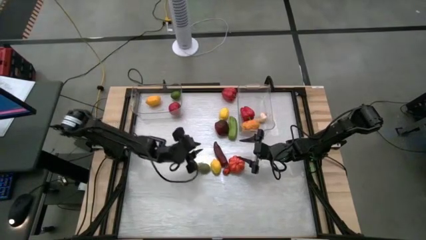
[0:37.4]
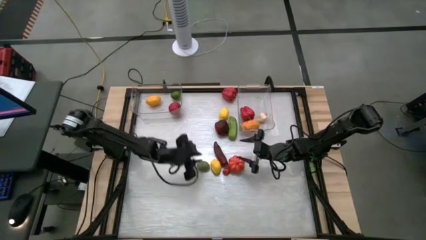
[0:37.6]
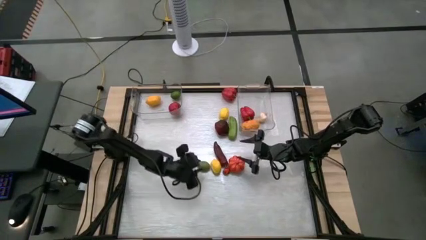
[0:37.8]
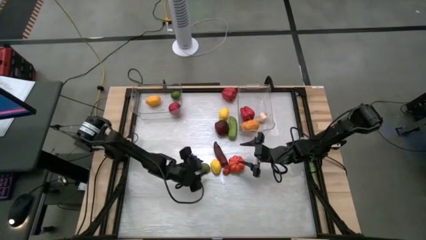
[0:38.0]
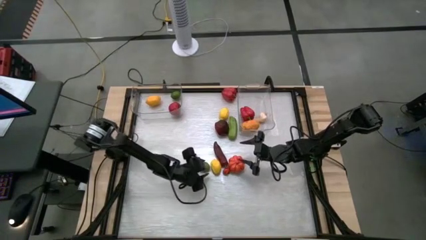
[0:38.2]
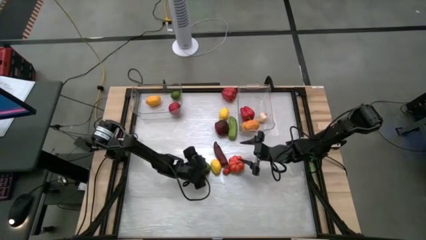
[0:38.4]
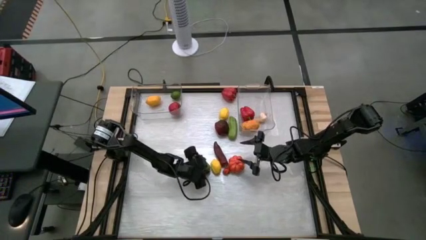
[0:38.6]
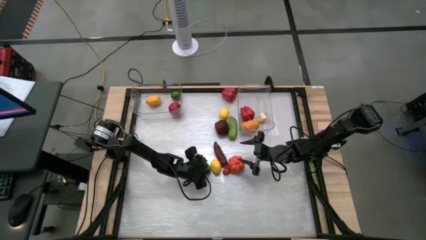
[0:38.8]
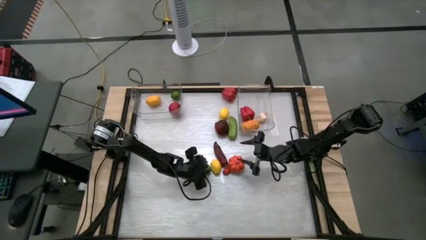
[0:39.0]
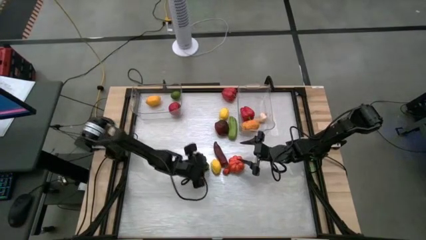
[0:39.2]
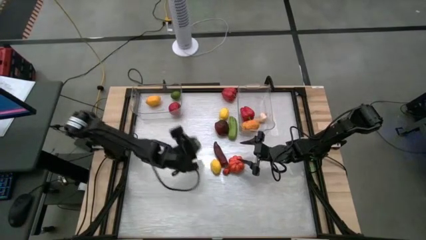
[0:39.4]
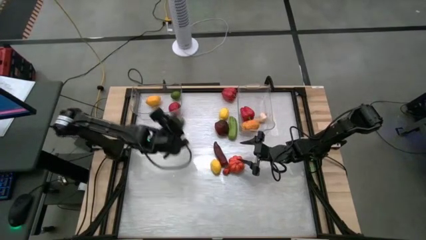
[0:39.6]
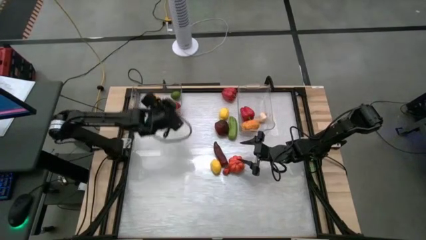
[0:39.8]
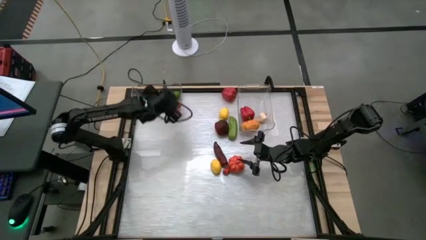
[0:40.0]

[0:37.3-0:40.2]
Task: Sort produce into baskets
Put the green lime into the left transparent bin

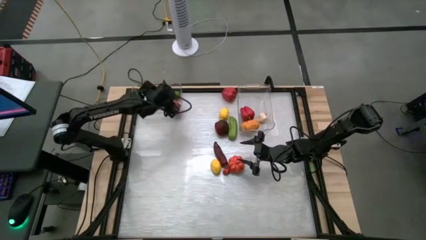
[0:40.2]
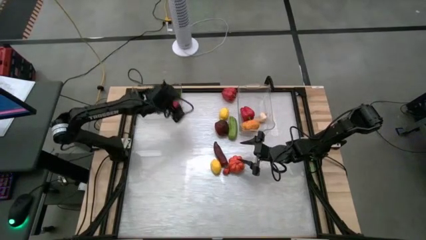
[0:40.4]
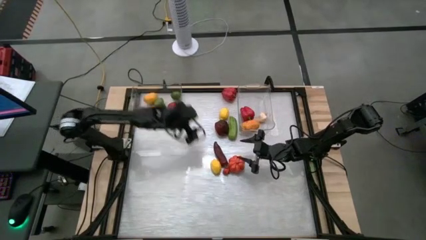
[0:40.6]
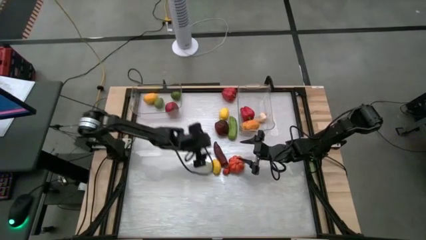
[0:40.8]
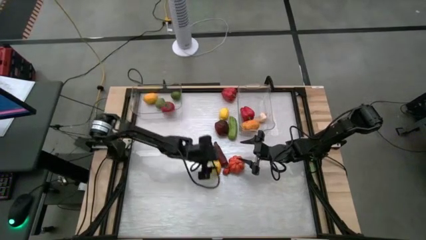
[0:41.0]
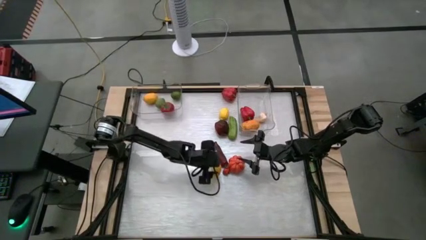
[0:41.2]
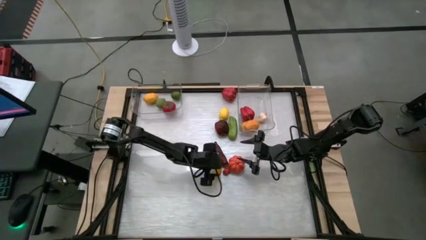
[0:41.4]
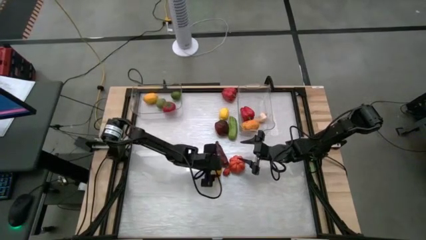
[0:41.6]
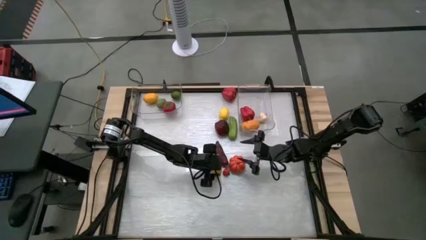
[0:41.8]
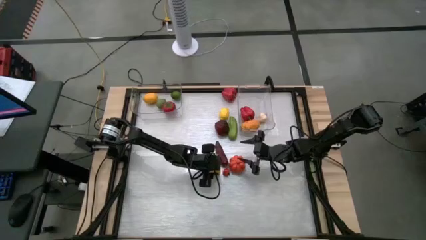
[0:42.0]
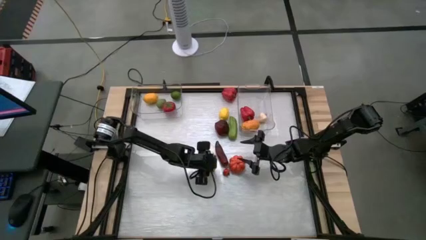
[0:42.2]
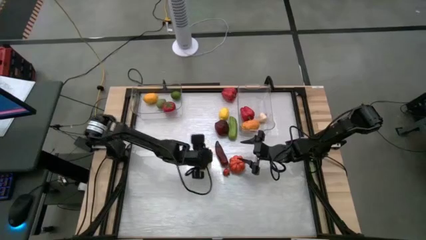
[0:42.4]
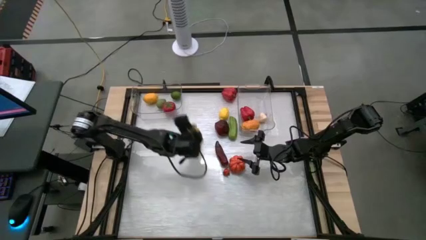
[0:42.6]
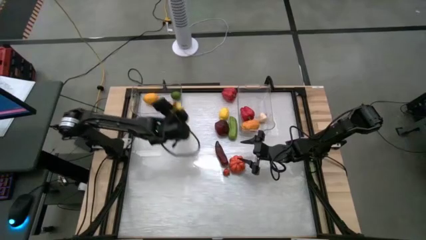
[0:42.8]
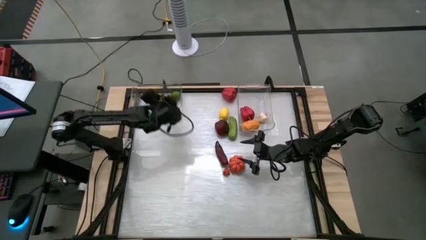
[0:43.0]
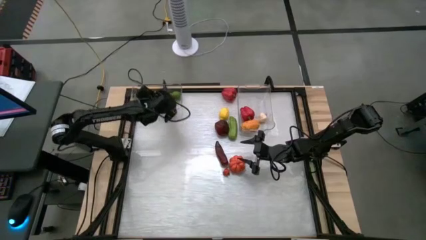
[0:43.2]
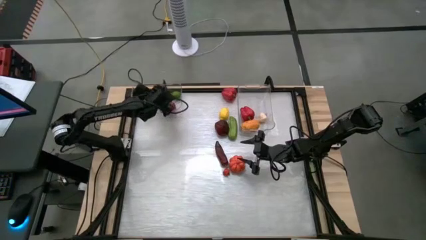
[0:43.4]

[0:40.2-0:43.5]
Put the bottom yellow lemon into the left transparent bin

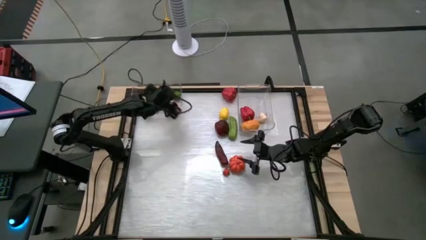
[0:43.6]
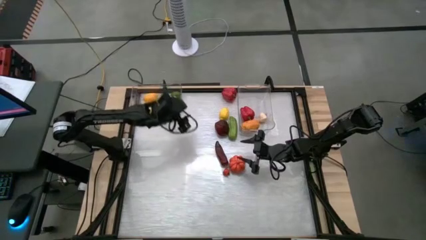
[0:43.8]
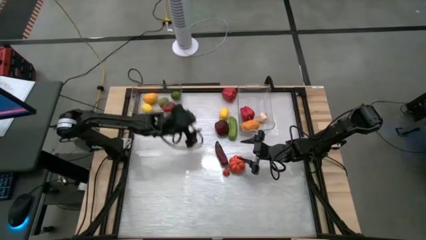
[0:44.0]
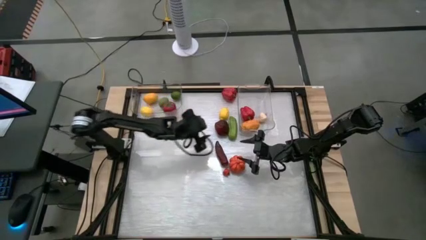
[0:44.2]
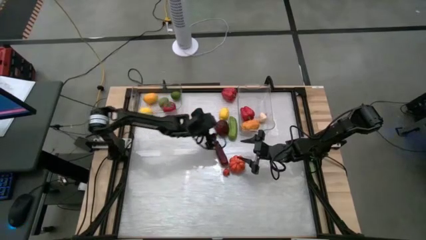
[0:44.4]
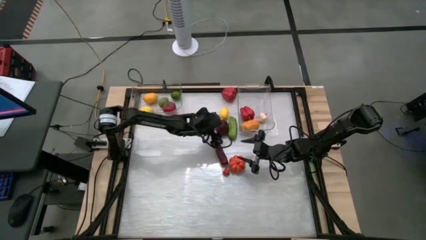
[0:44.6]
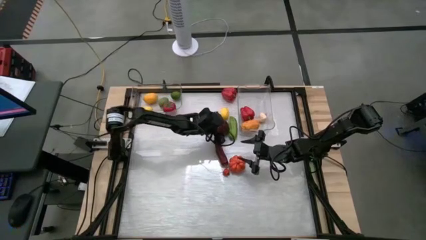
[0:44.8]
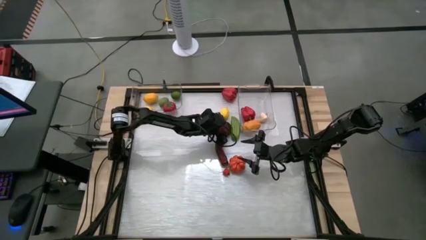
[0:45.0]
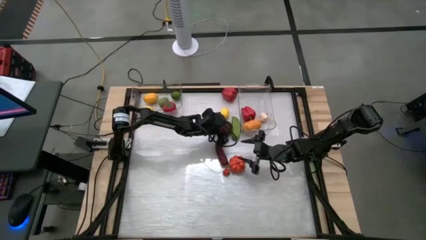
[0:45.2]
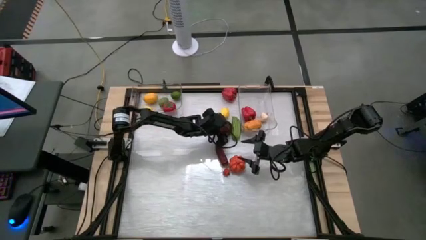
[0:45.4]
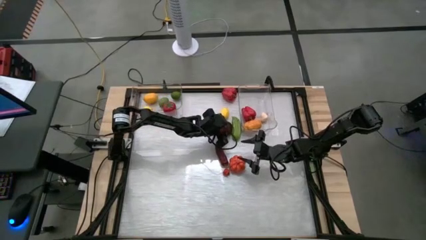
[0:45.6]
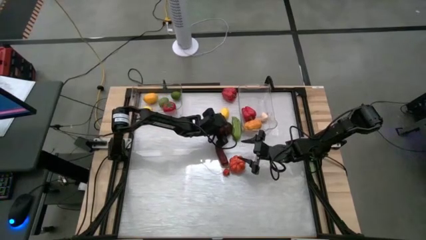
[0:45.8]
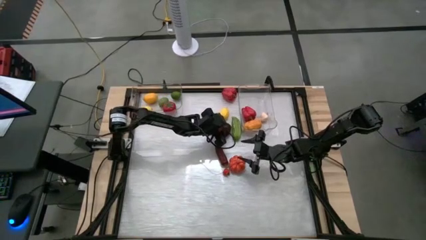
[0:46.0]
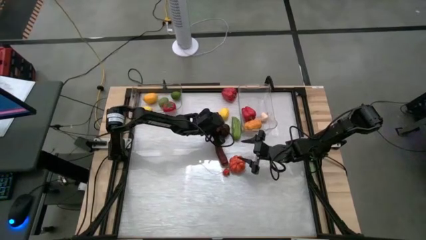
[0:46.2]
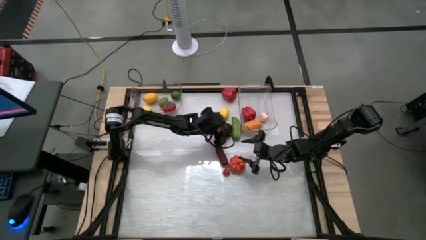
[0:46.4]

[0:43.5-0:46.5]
Put the dark red apple into the left transparent bin

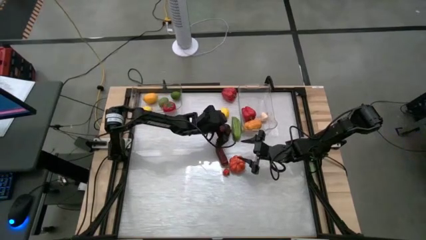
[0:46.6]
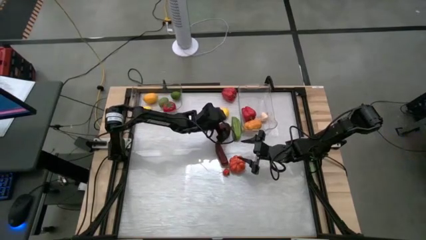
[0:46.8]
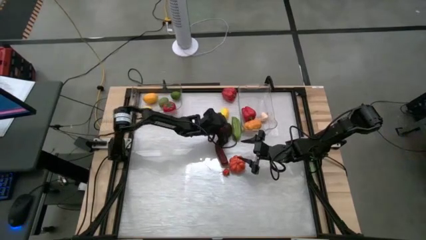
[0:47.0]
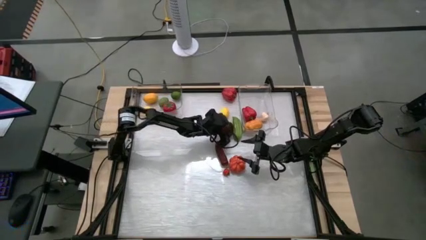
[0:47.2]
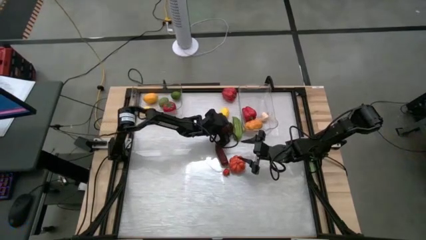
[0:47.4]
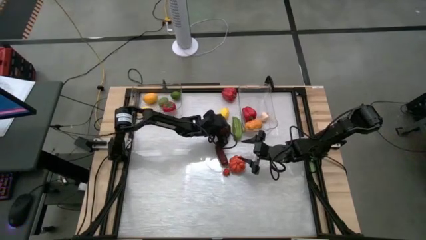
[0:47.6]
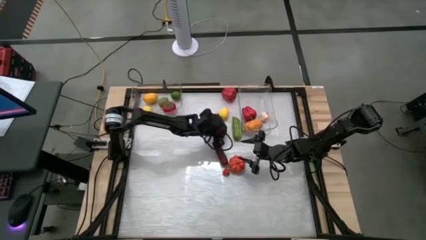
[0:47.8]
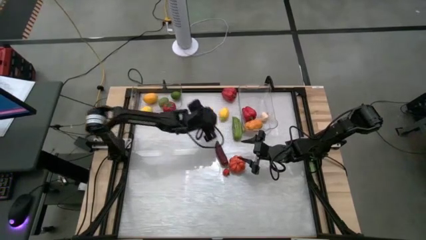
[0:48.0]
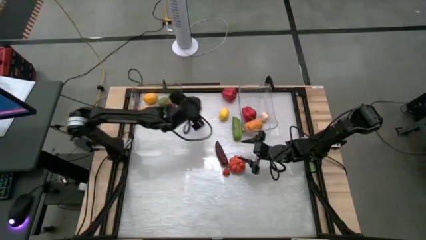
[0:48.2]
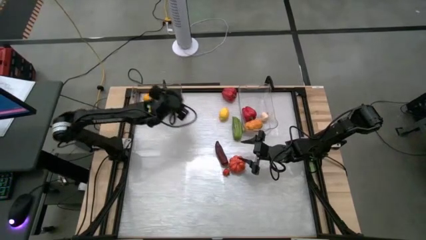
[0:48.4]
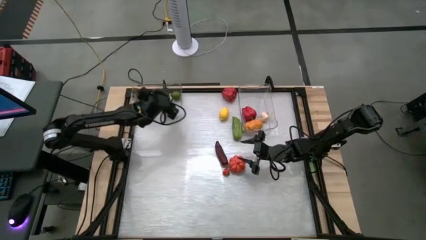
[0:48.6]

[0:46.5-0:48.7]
Put the dark red apple into the left transparent bin

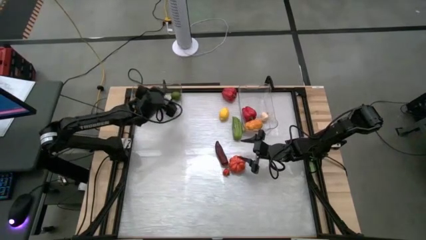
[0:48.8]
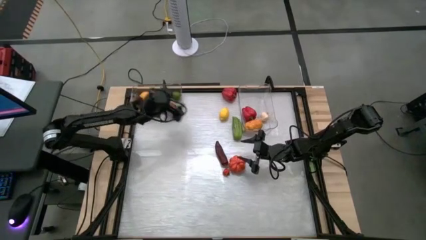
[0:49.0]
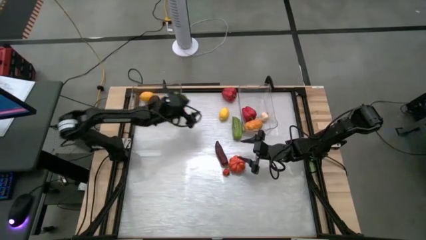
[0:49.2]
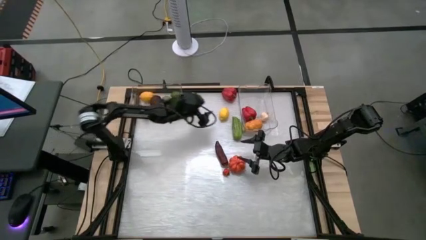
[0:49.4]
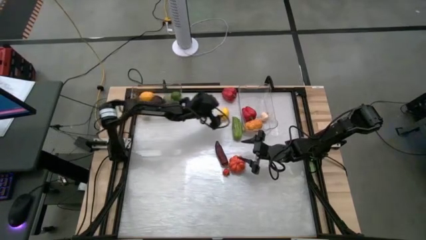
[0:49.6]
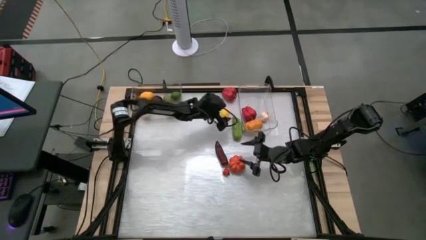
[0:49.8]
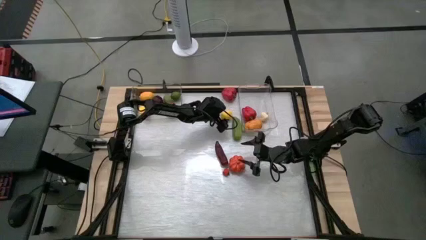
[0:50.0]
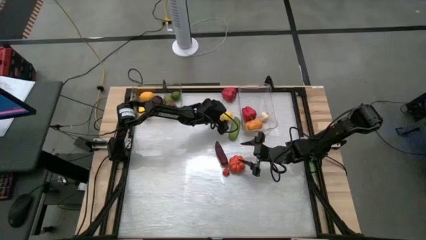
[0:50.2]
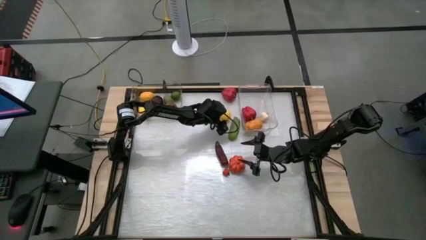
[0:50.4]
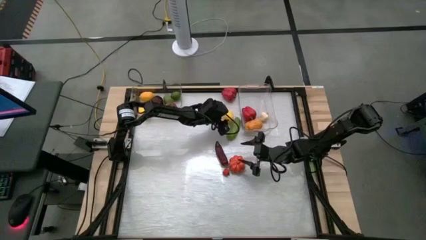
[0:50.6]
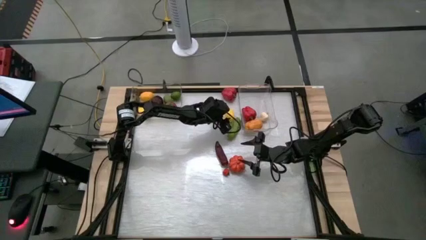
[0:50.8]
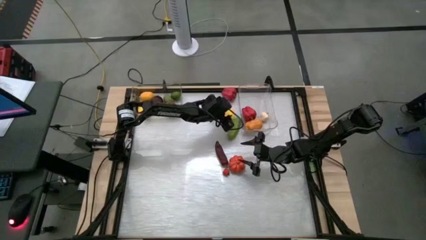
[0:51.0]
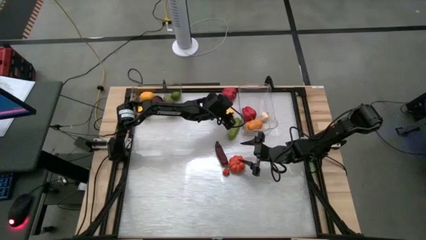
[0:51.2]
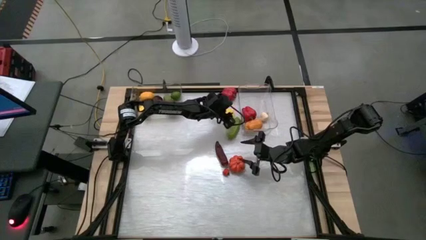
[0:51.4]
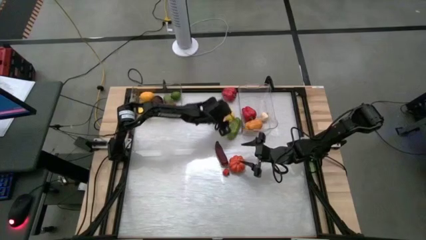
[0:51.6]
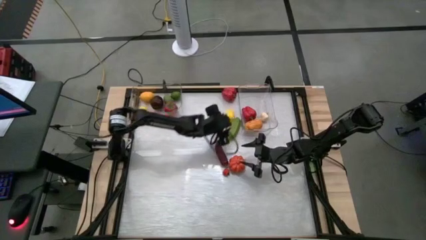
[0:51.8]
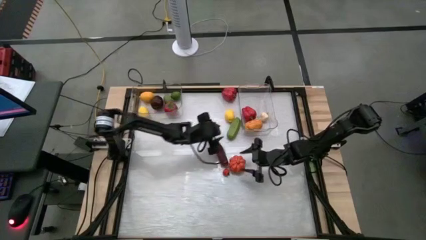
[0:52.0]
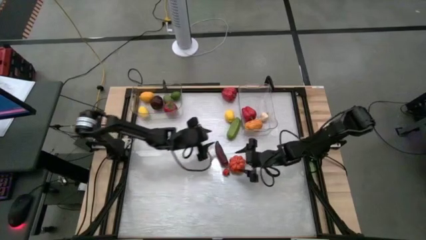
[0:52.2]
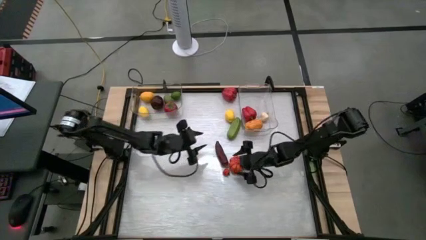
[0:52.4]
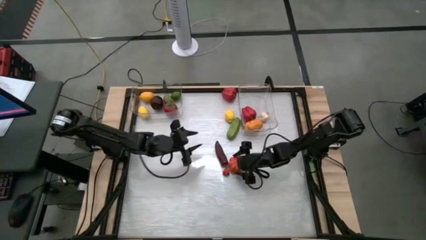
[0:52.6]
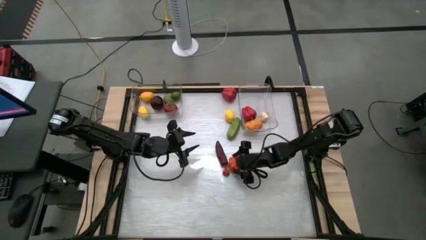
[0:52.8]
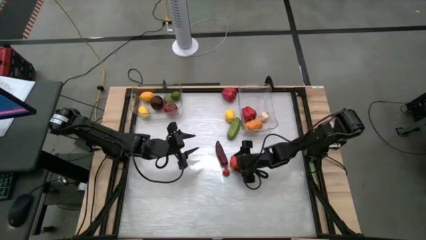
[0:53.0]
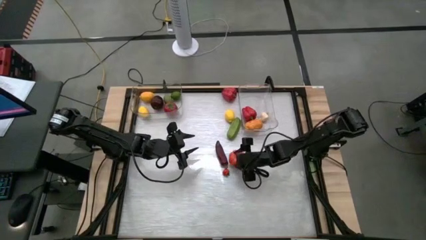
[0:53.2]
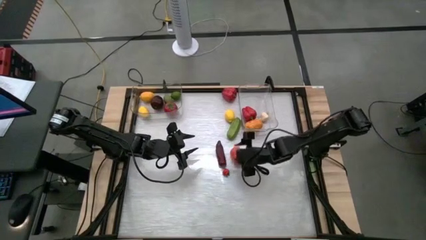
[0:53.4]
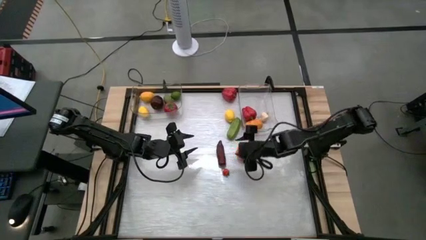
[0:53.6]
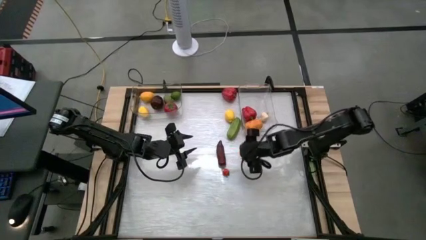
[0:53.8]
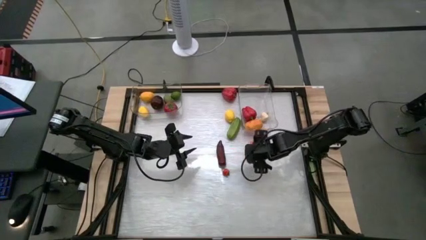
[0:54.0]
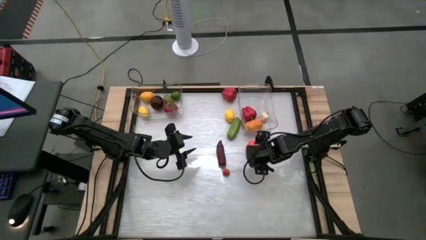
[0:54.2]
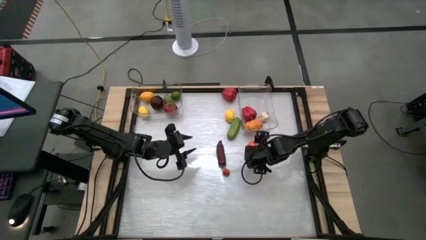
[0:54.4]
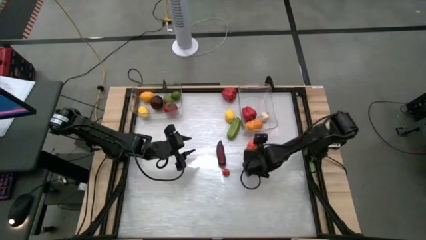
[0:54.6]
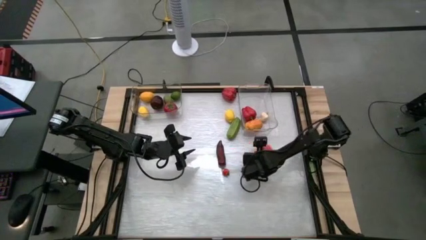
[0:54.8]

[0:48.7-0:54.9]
Put the orange pumpkin into the right transparent bin
